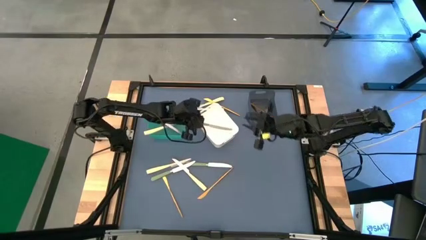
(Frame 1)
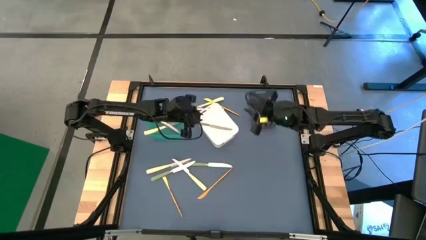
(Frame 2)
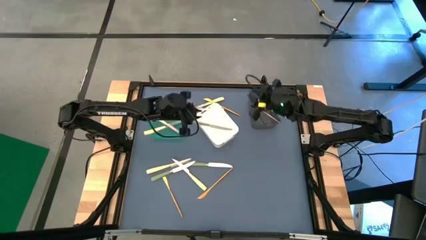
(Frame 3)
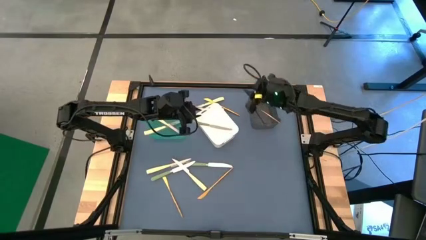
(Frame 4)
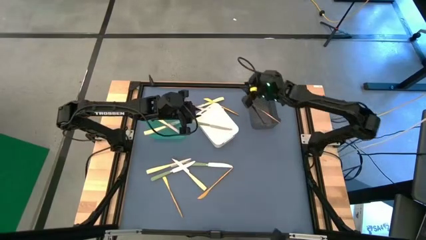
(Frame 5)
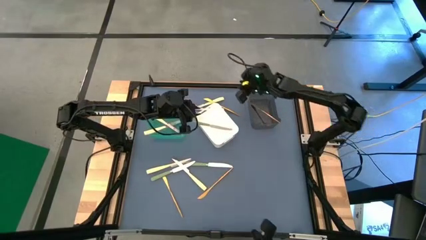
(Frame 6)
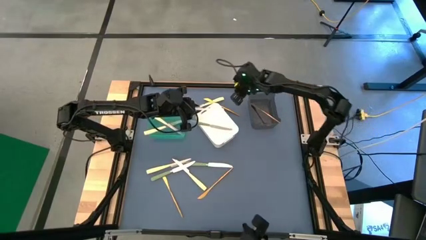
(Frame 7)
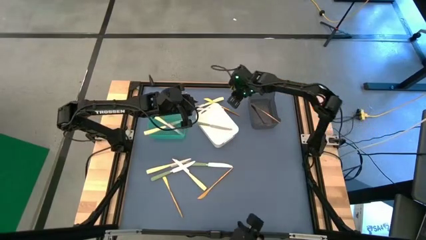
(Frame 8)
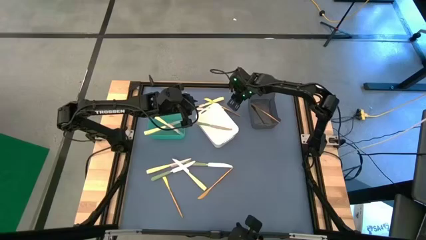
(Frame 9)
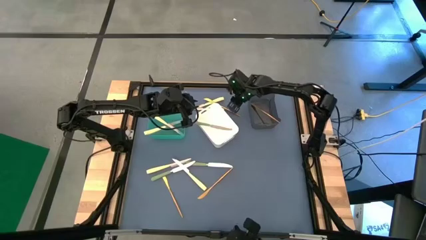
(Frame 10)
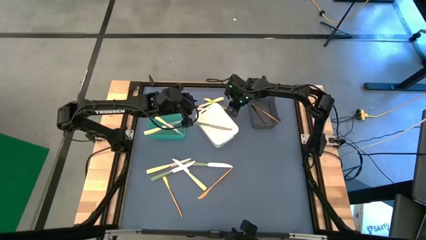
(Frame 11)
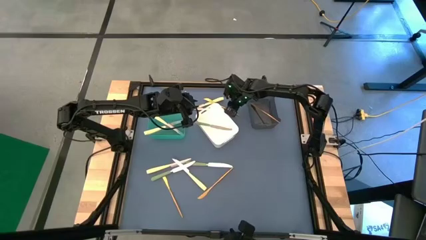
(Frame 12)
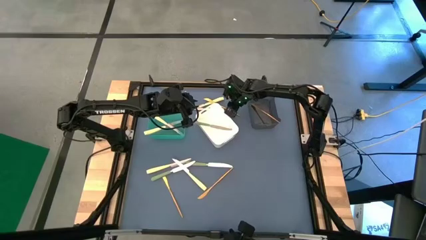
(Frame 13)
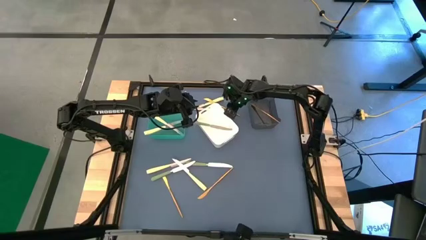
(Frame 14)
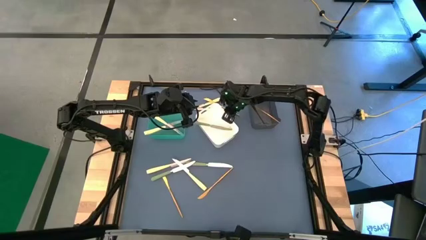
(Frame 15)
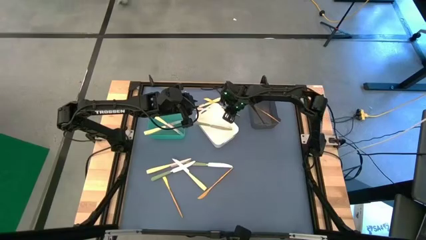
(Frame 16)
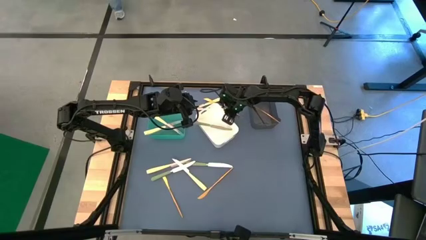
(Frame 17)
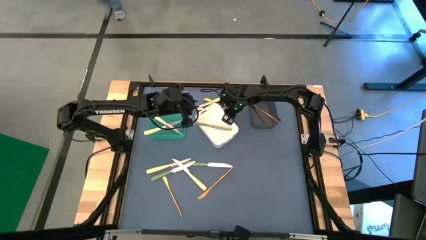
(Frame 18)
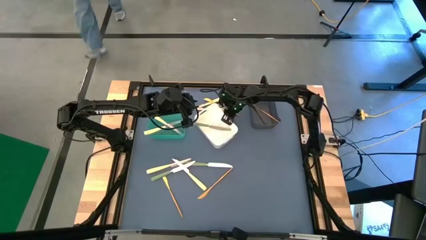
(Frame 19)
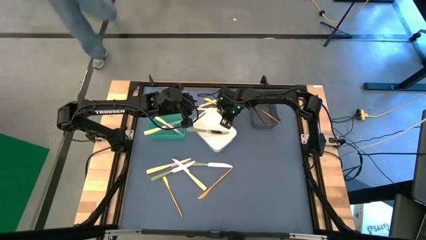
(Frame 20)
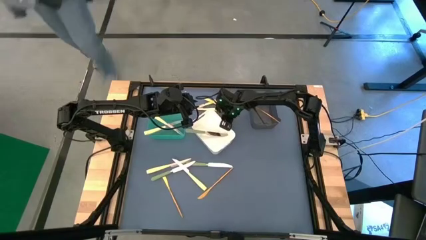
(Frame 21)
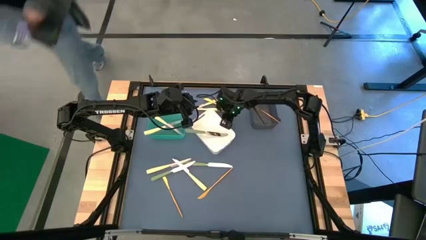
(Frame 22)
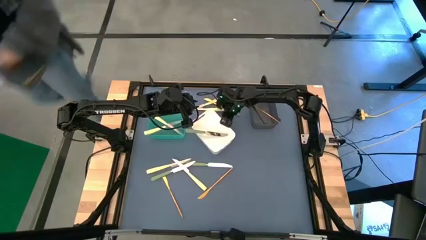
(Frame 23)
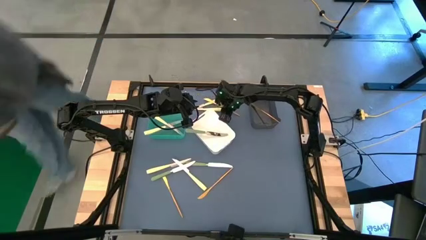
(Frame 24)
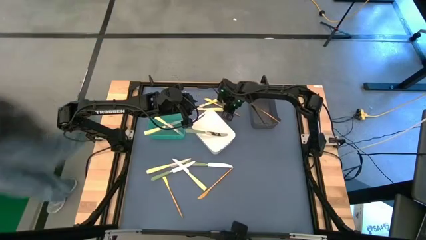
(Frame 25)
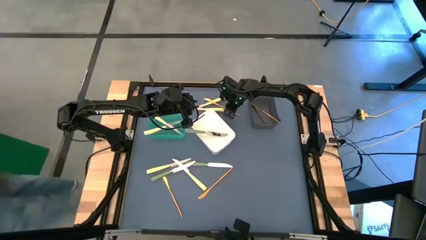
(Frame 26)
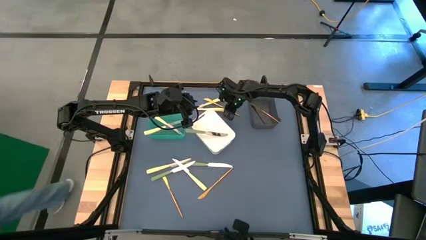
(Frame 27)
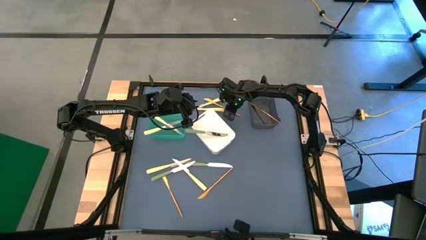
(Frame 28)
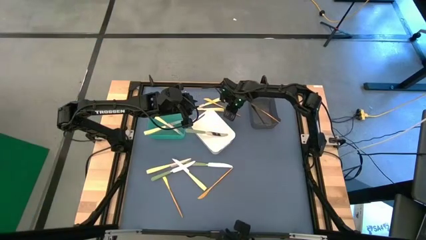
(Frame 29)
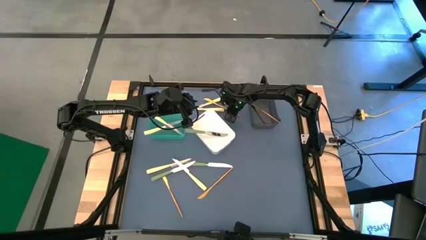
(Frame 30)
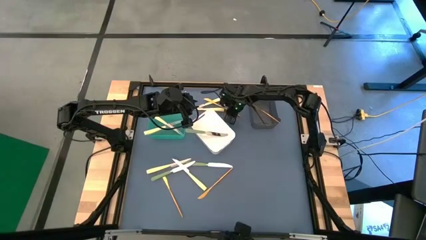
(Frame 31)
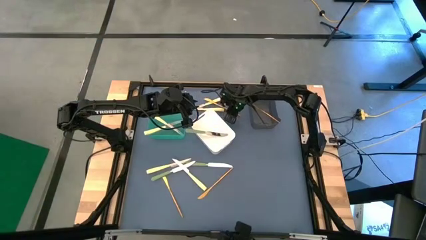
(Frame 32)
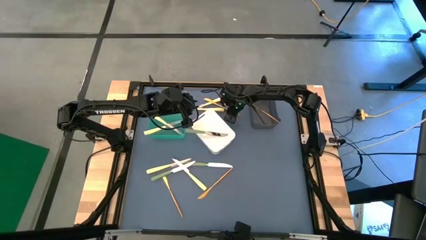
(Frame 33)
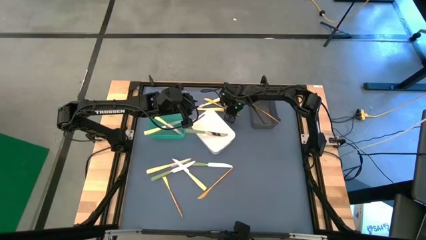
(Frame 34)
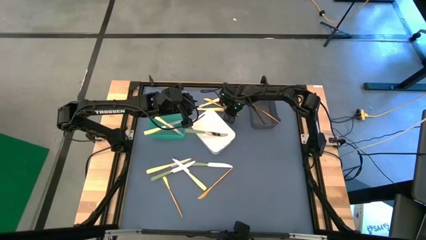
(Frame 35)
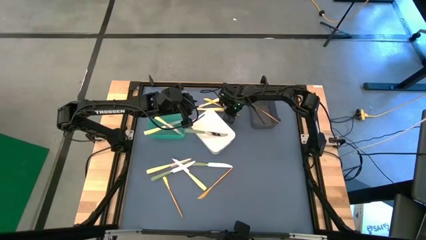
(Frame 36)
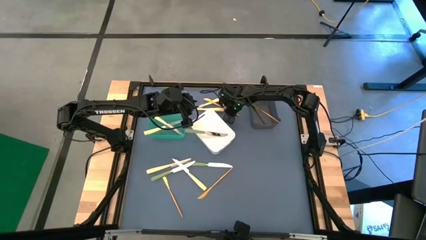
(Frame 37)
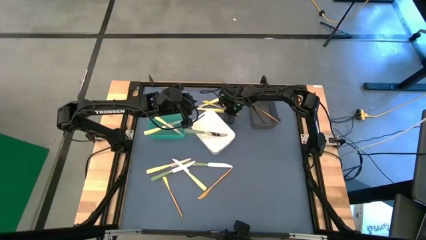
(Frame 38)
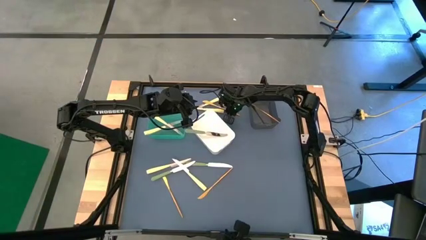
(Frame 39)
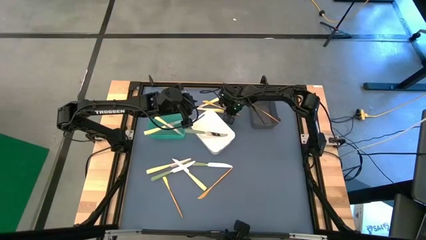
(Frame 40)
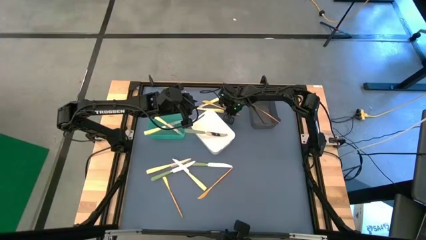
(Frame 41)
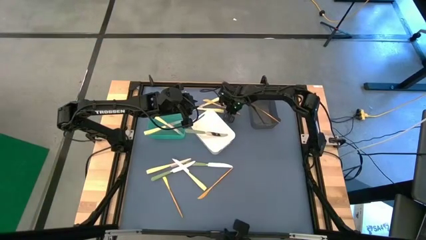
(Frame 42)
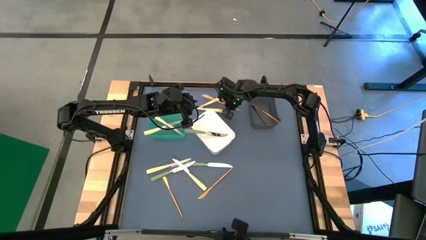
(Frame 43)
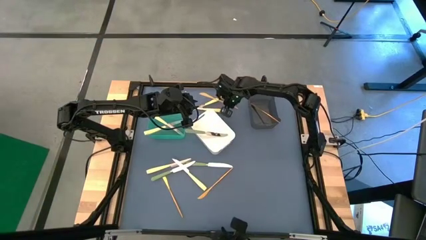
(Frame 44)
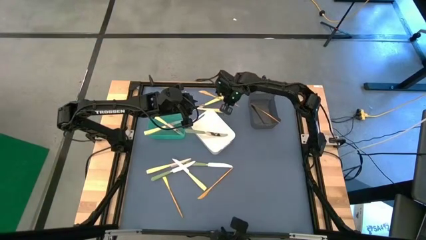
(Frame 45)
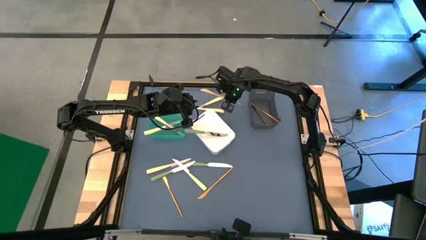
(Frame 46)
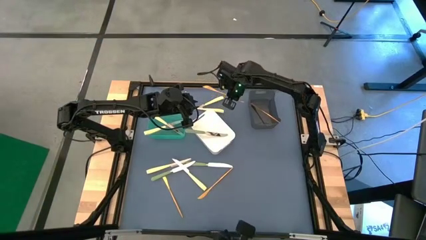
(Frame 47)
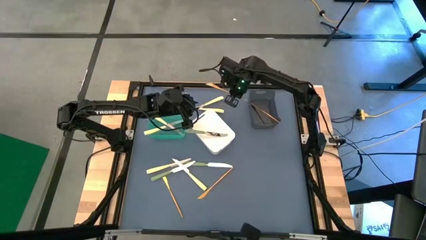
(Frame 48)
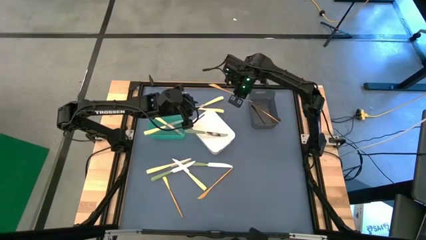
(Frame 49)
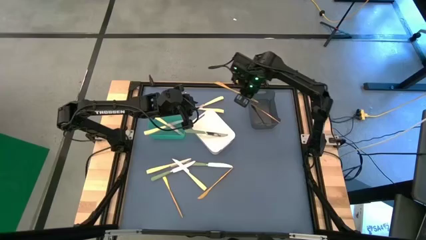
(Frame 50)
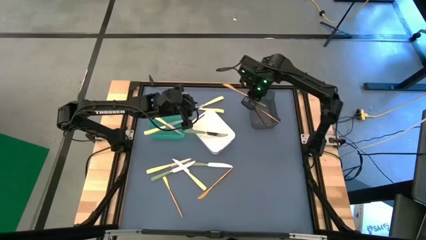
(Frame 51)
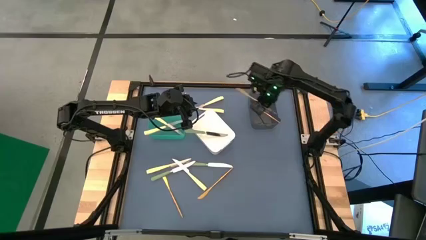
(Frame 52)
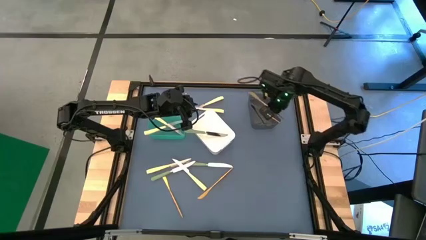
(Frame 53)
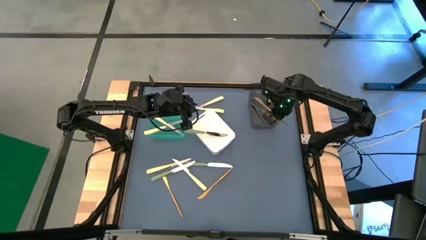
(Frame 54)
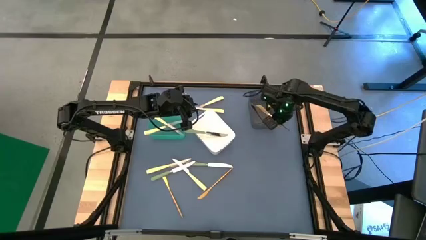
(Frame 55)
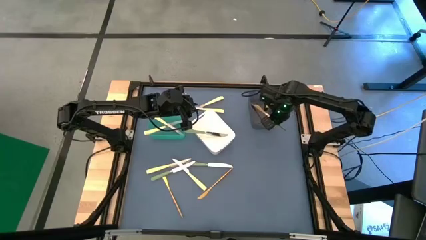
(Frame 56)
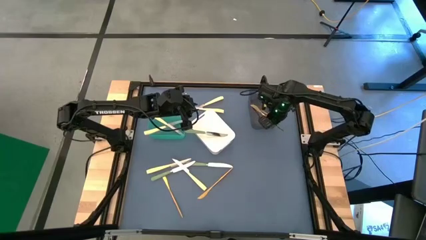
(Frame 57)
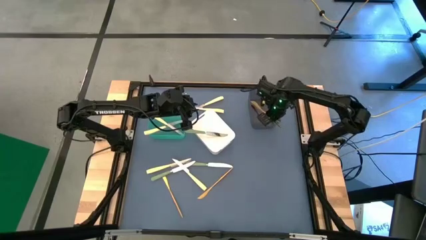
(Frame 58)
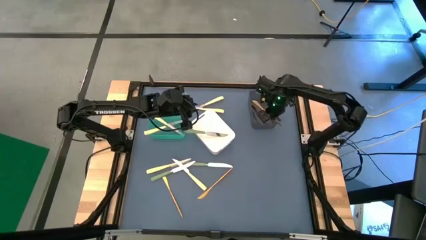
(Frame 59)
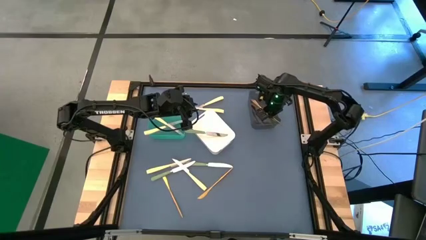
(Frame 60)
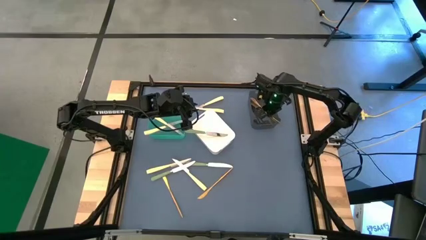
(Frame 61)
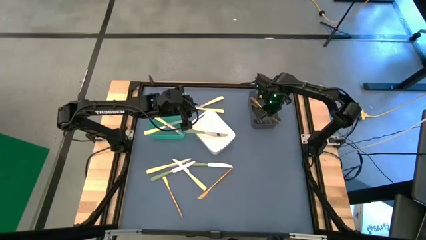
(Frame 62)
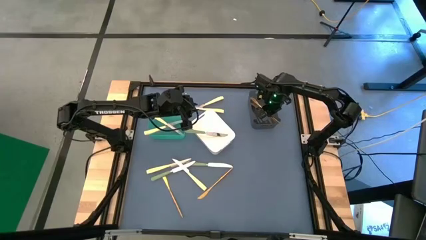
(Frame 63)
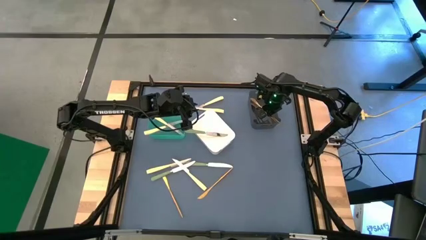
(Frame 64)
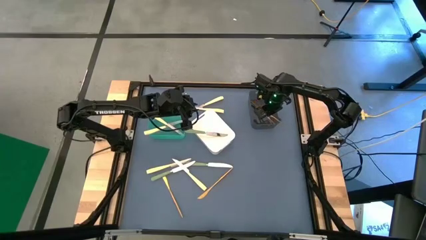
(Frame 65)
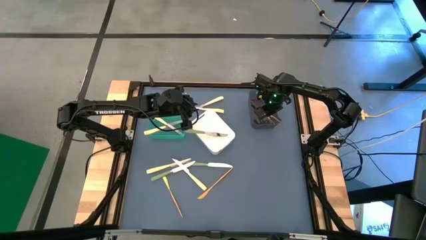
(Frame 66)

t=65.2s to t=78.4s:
Task: Sort silverware by color (type)
Put the top gold table knife into the black bin
